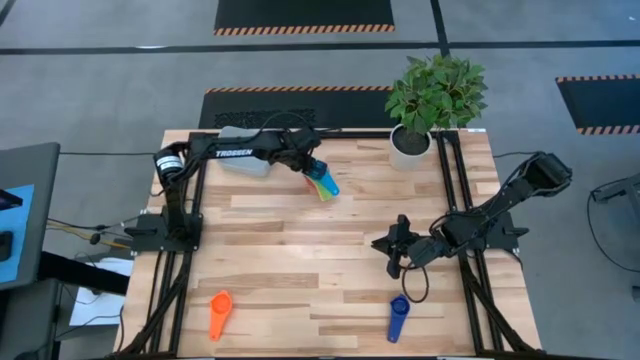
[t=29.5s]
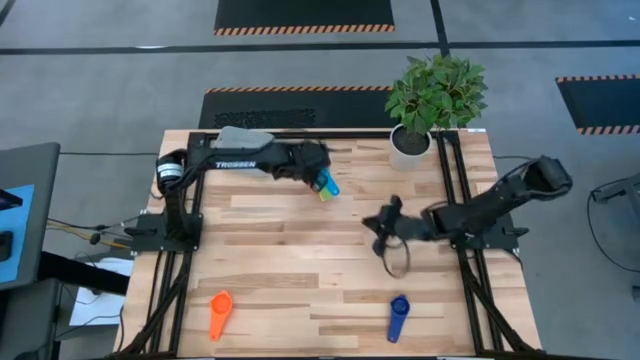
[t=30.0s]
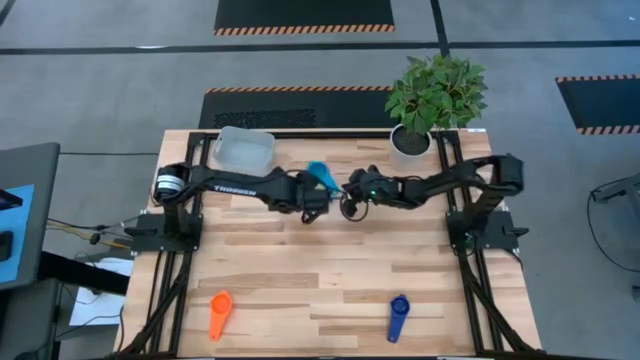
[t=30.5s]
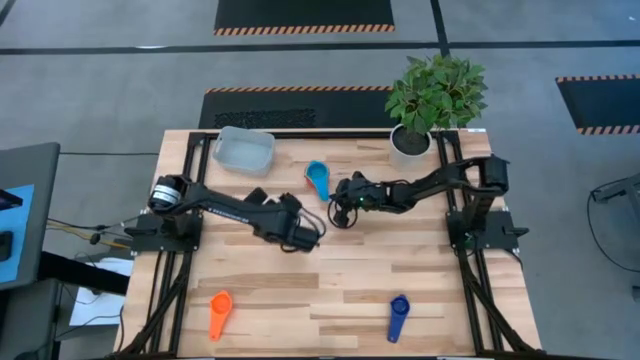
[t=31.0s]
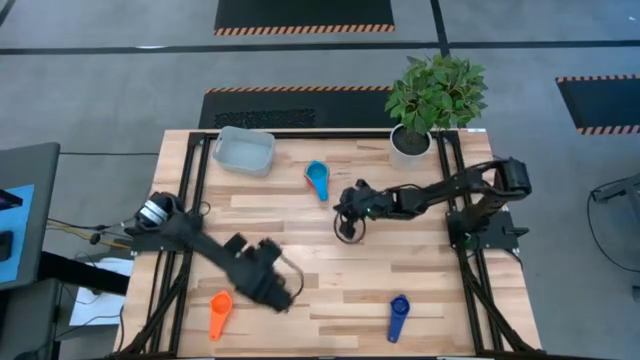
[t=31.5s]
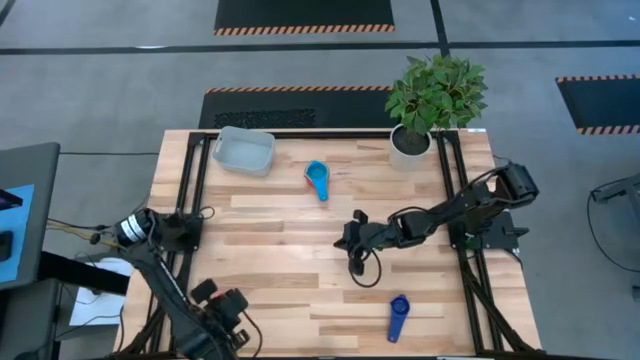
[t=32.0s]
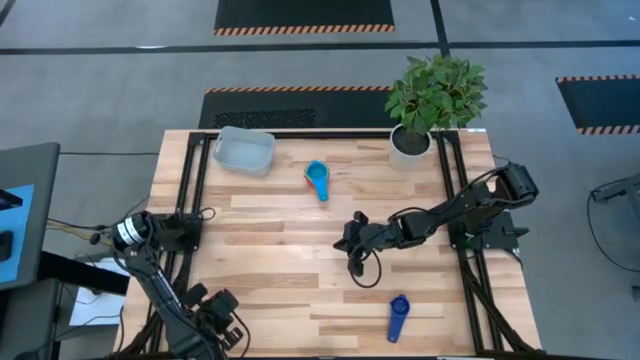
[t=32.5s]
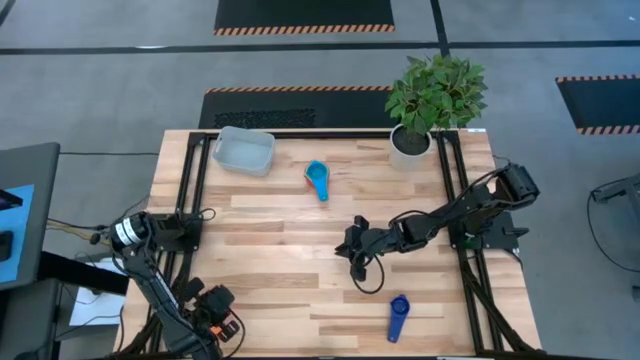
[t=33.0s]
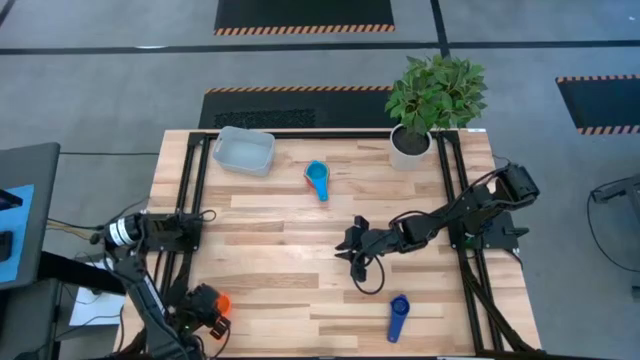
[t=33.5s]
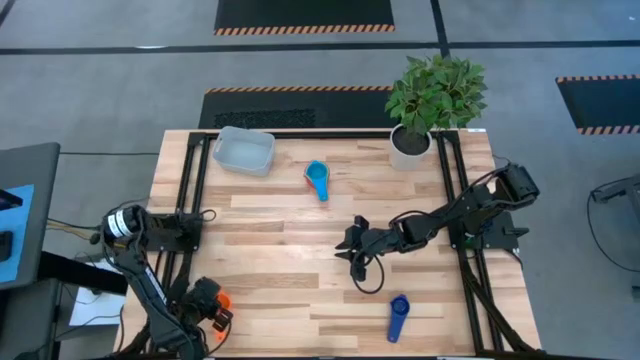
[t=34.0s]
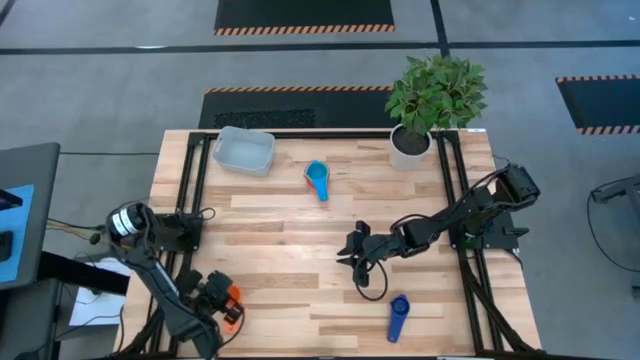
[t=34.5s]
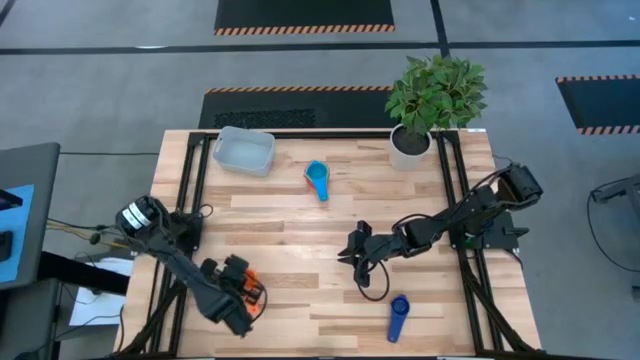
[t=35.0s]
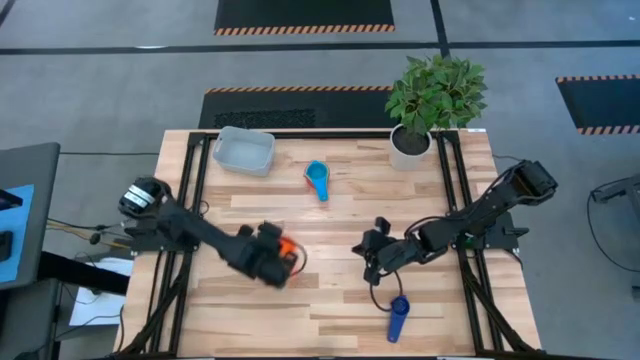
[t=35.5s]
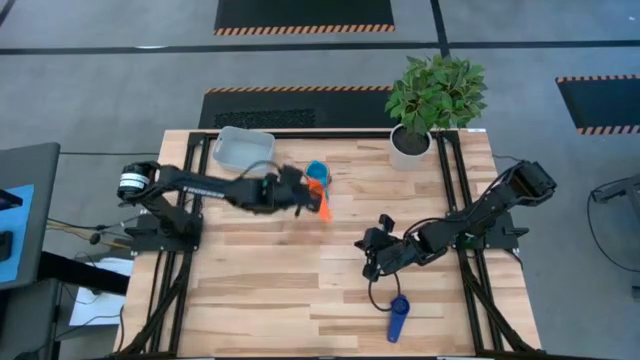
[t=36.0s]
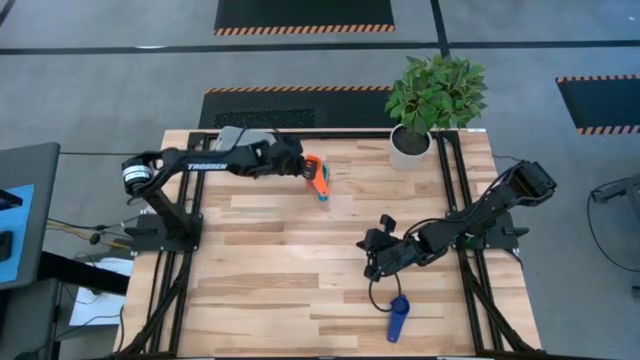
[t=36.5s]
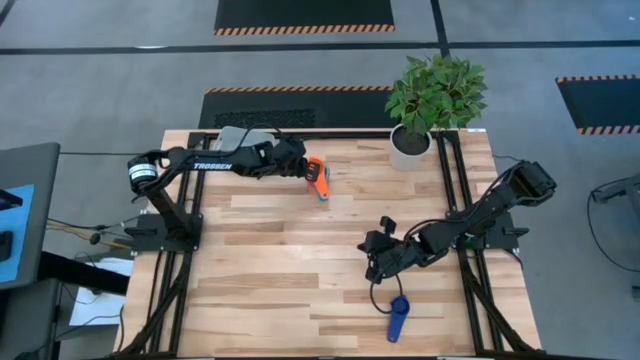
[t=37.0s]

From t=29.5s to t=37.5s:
Task: Nest measuring cups in basket
Stack the orange measuring cup on top of the light blue measuring cup

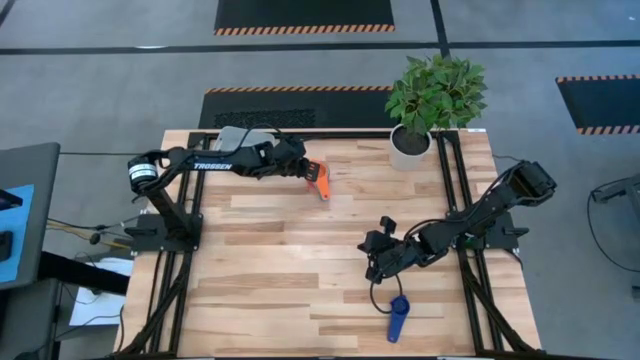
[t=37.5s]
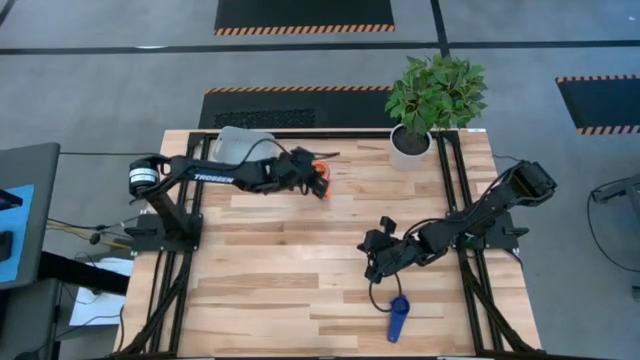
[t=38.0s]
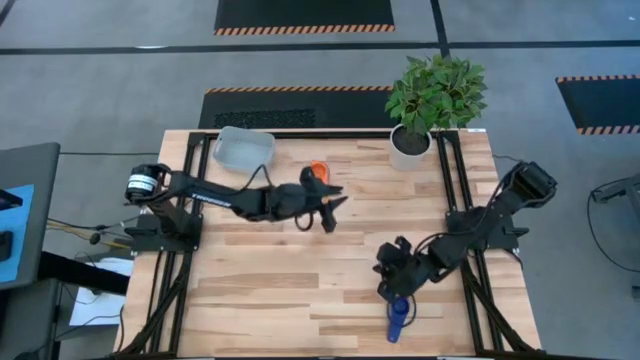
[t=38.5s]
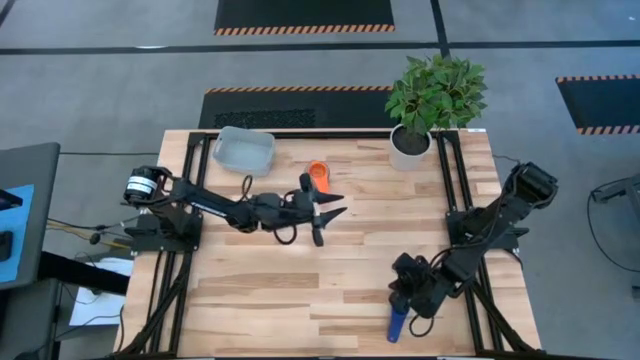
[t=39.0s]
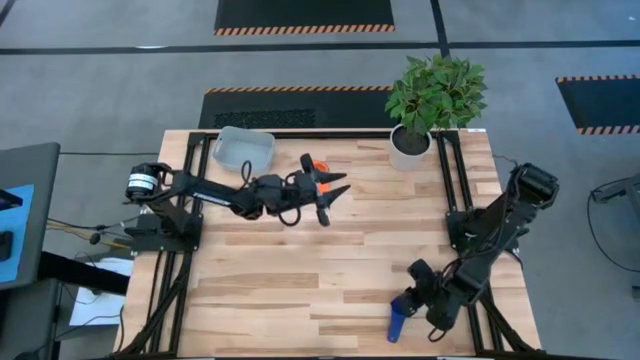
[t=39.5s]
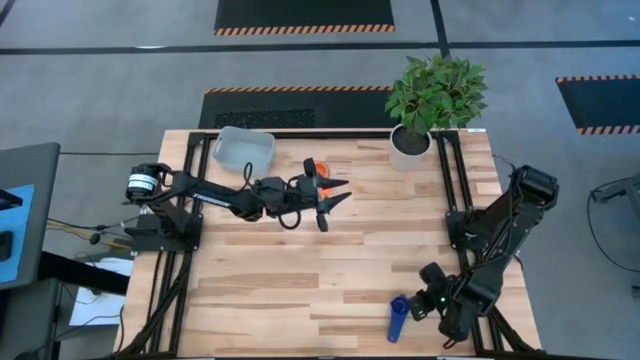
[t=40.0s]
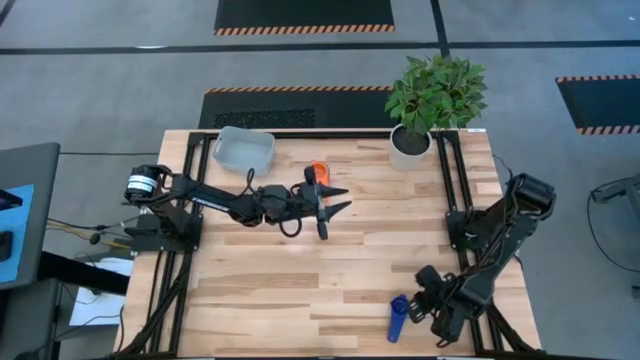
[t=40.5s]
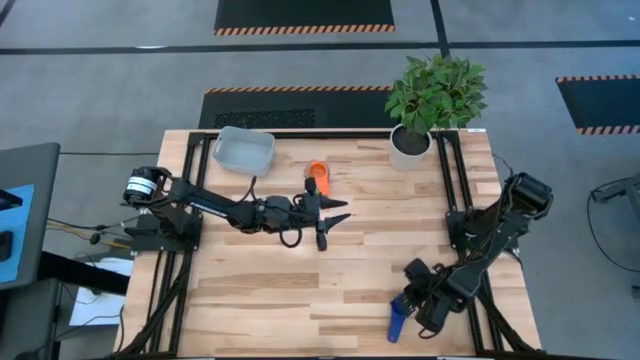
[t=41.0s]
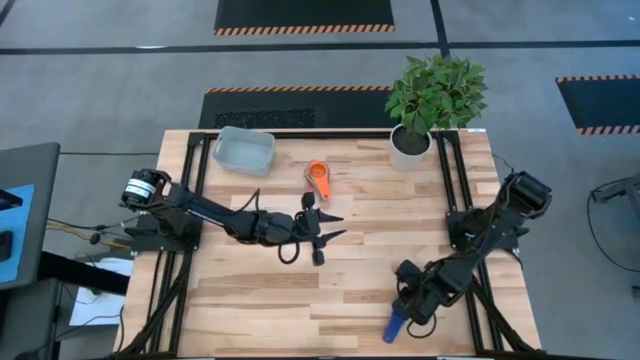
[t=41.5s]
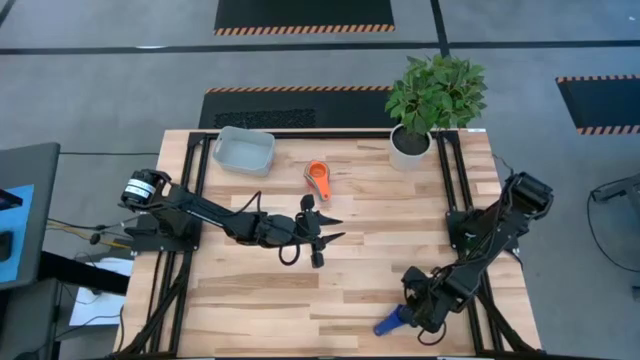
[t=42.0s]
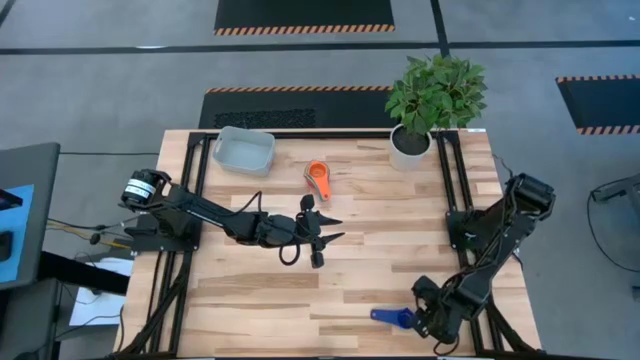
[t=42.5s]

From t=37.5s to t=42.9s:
Stack the dark blue measuring cup on top of the orange measuring cup

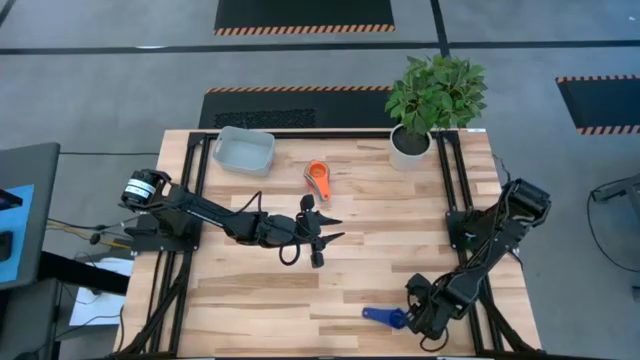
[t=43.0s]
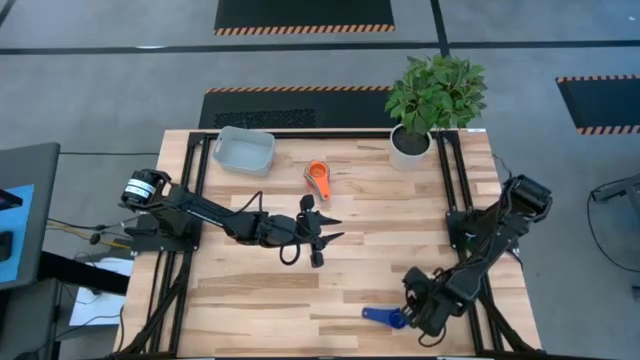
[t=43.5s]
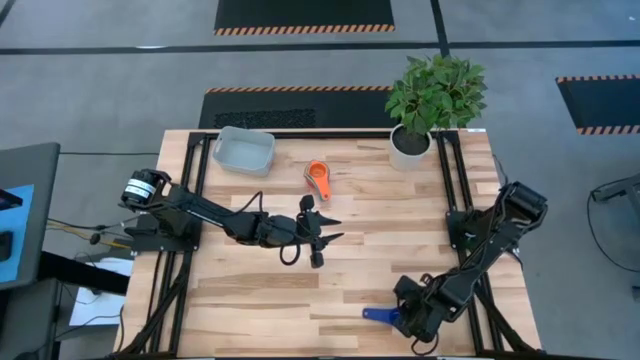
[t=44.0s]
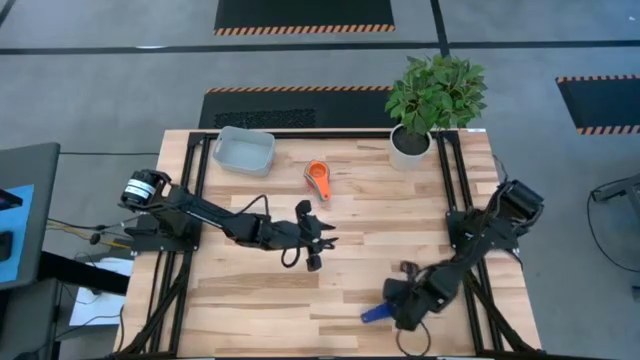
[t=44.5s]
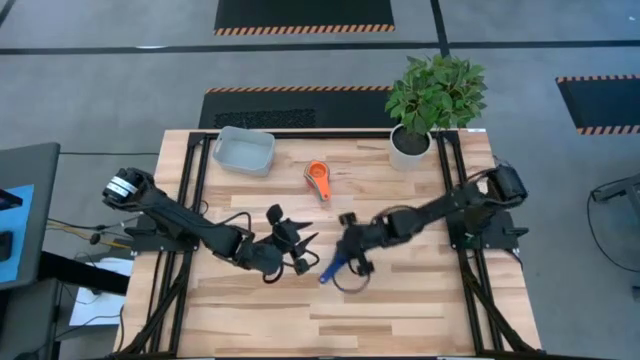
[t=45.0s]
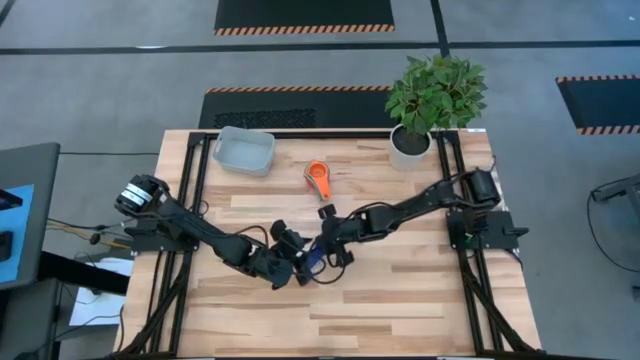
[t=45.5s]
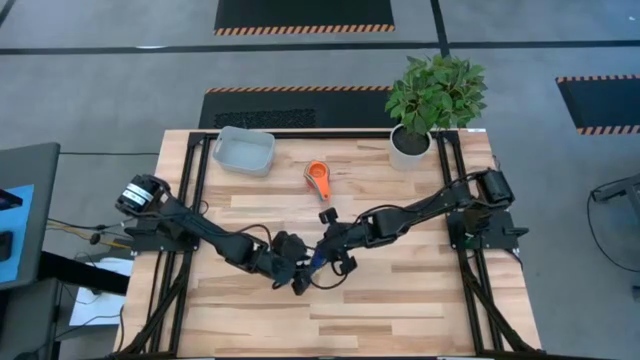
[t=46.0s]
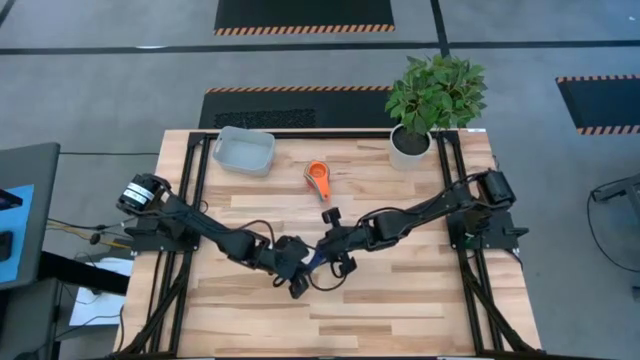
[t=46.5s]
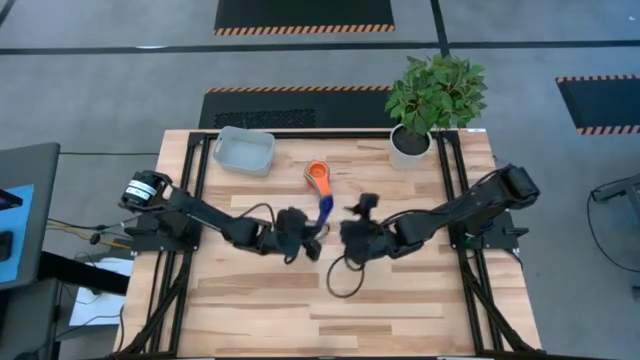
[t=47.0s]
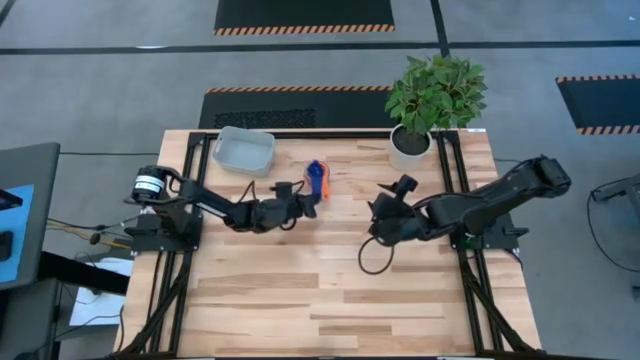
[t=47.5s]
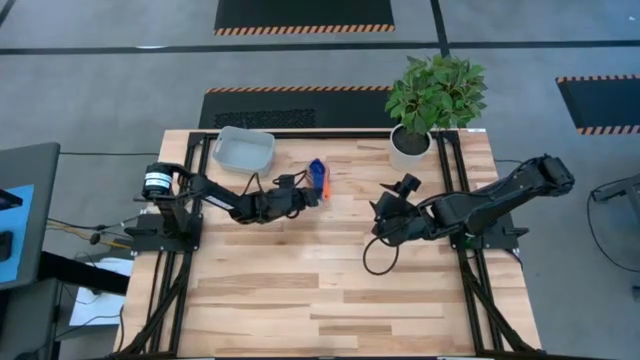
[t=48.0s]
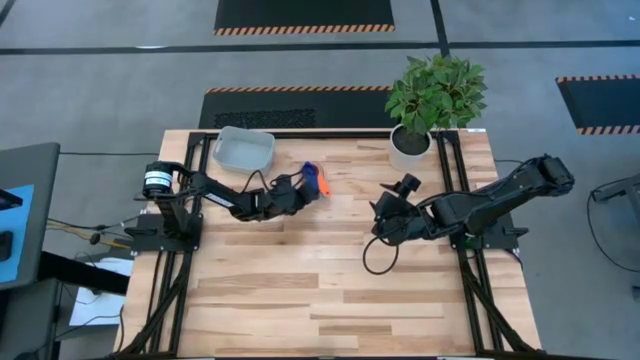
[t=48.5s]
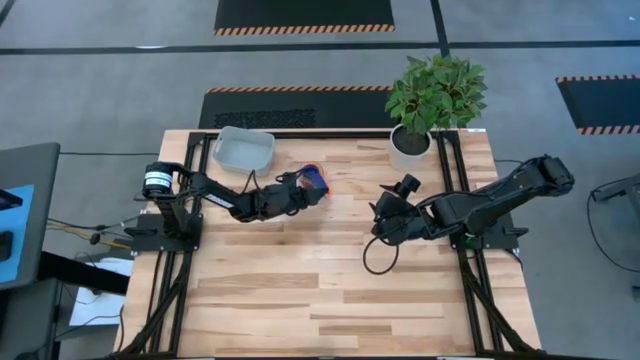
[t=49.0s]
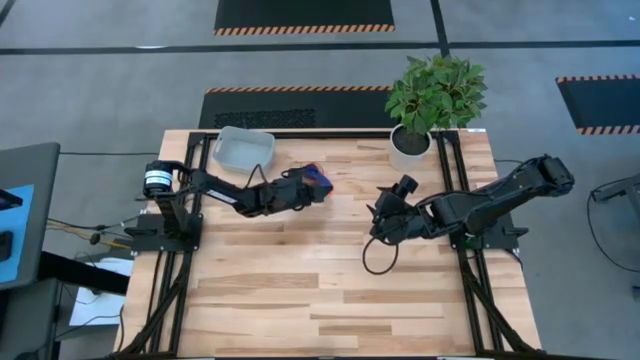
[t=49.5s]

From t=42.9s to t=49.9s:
Stack the dark blue measuring cup on top of the orange measuring cup

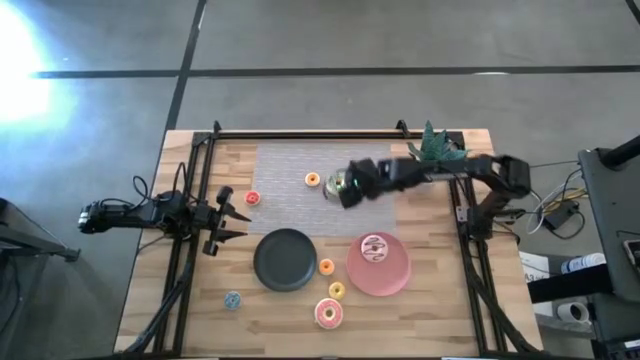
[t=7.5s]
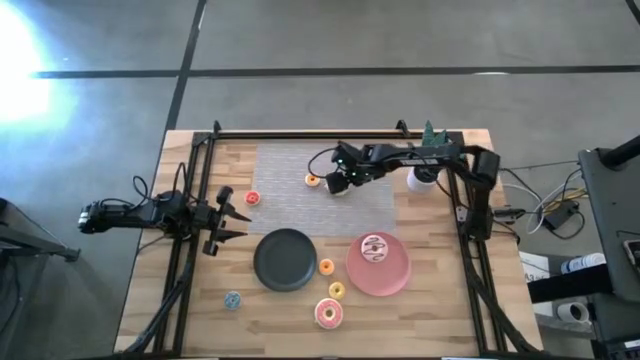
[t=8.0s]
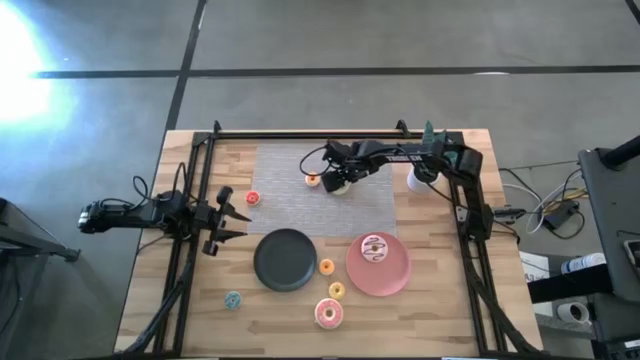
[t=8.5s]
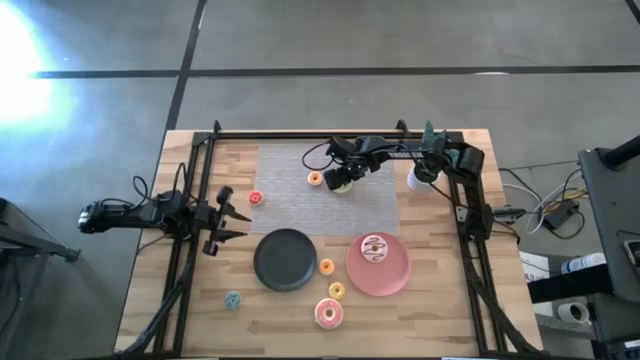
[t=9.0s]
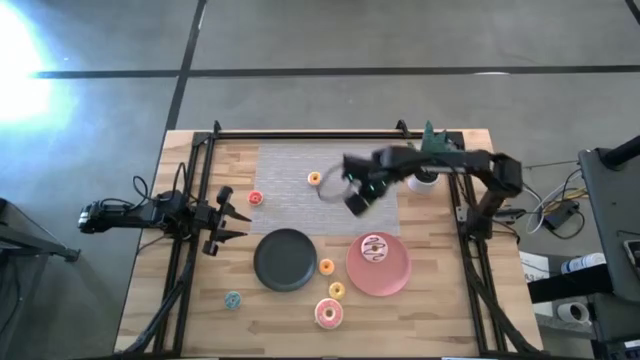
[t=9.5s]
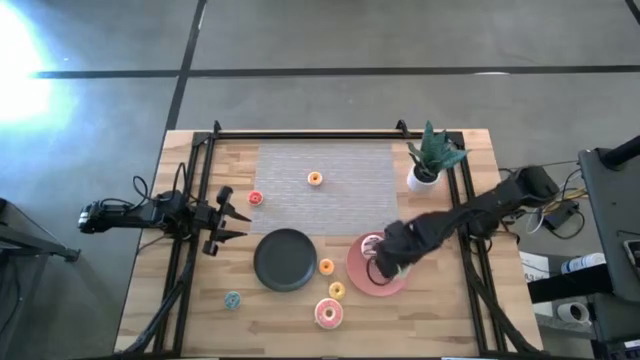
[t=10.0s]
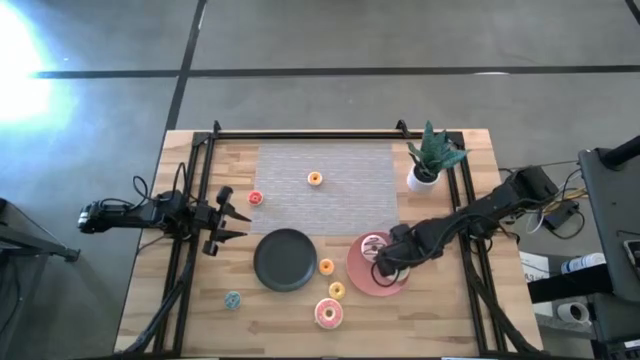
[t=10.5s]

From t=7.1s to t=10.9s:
Task: Pick & Place donuts
Put the large green donut on the pink plate
